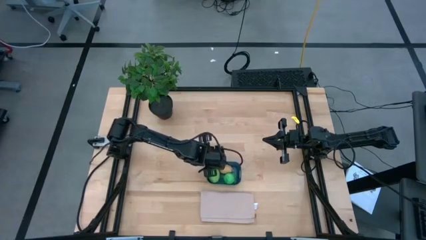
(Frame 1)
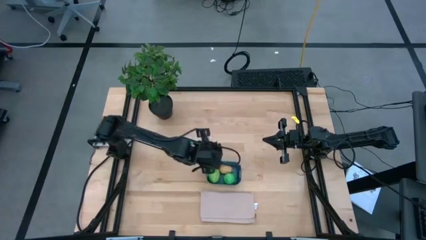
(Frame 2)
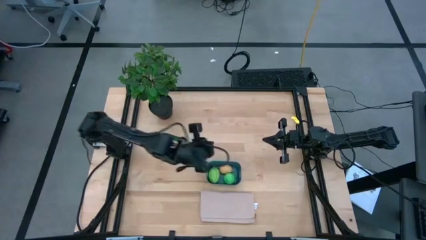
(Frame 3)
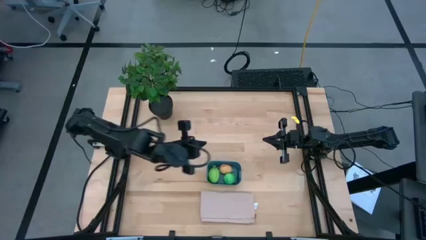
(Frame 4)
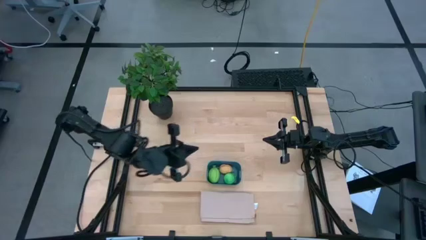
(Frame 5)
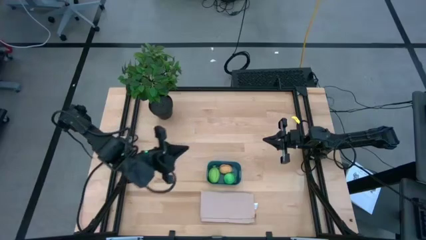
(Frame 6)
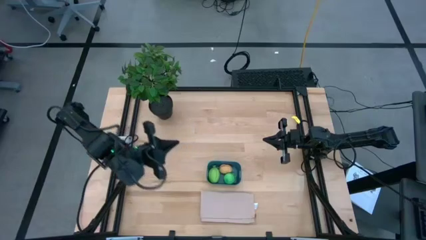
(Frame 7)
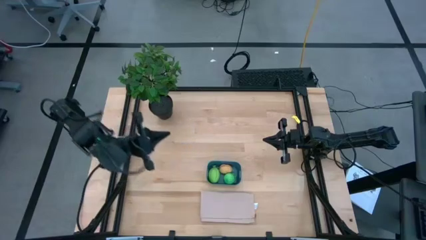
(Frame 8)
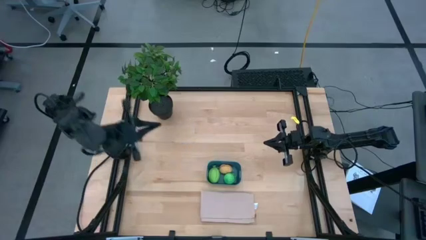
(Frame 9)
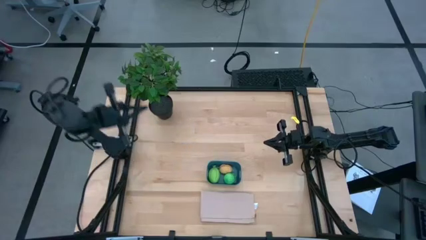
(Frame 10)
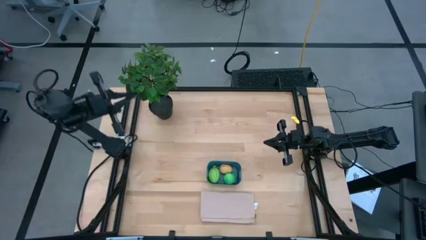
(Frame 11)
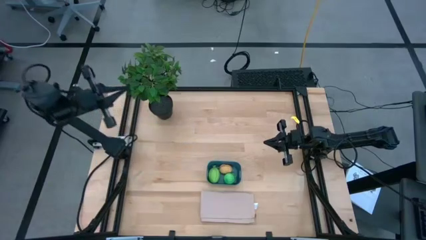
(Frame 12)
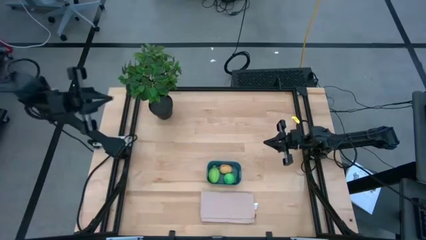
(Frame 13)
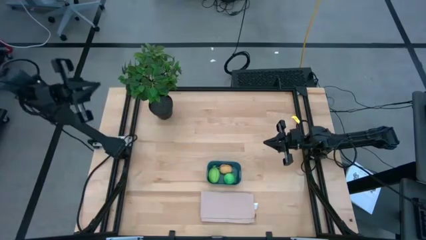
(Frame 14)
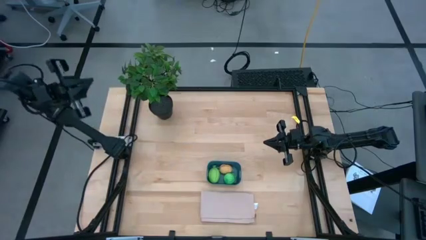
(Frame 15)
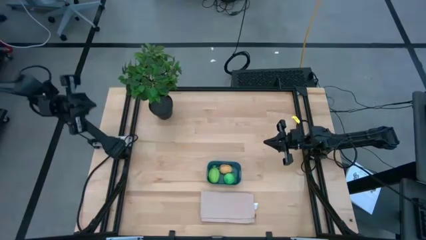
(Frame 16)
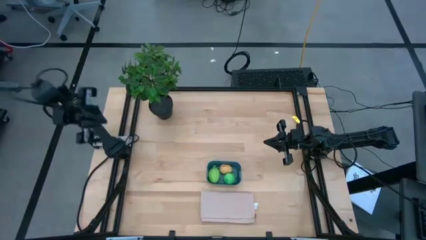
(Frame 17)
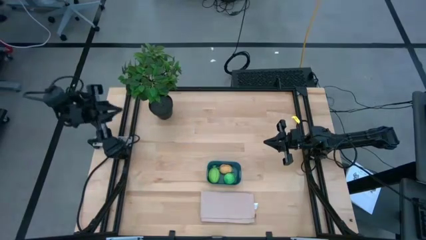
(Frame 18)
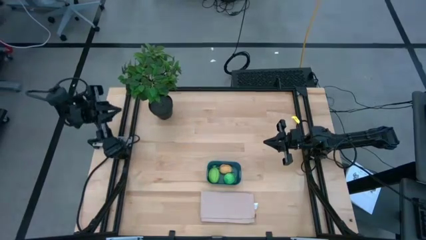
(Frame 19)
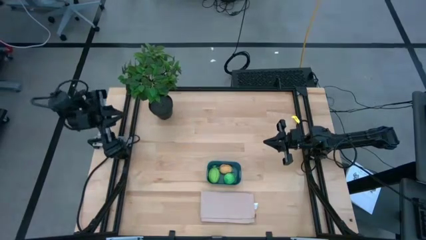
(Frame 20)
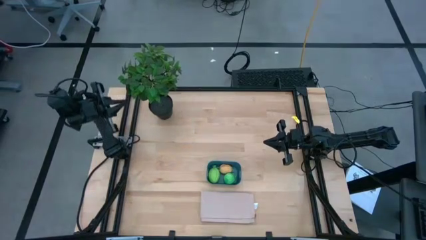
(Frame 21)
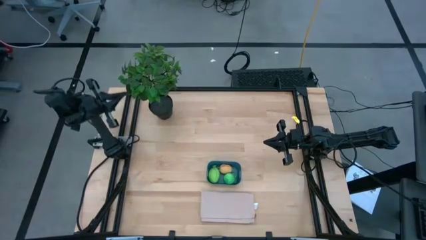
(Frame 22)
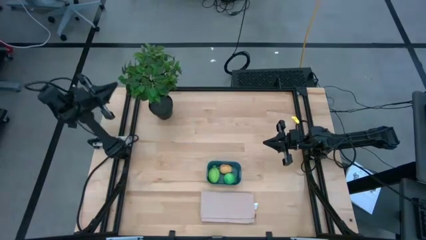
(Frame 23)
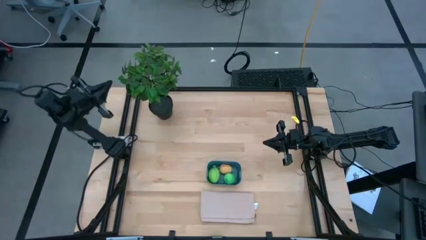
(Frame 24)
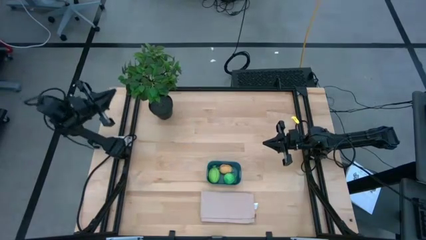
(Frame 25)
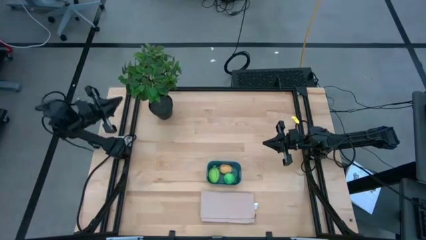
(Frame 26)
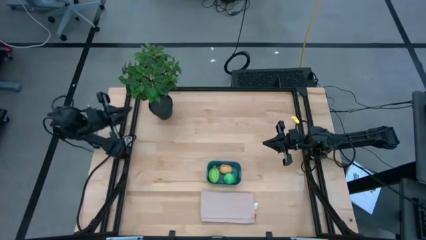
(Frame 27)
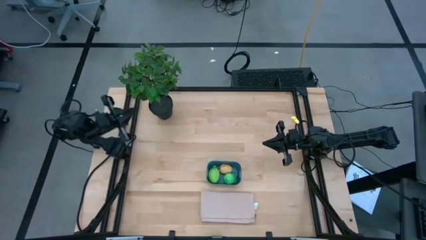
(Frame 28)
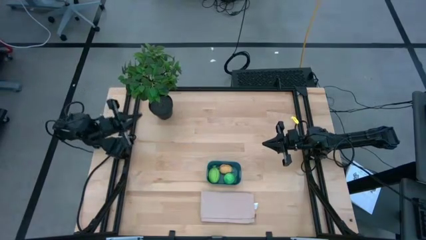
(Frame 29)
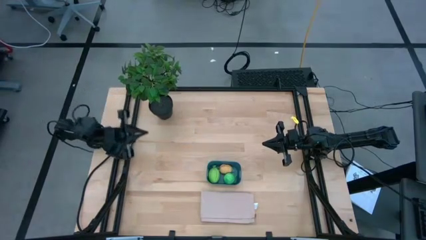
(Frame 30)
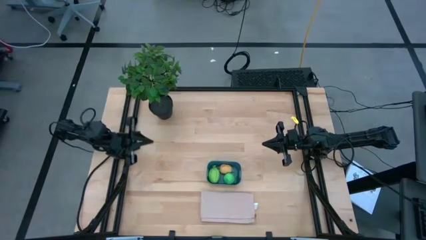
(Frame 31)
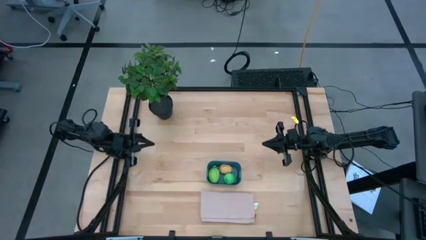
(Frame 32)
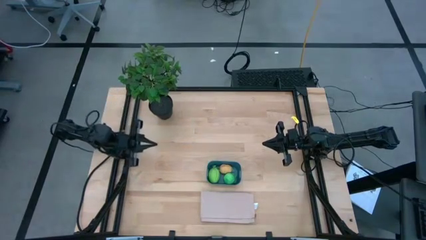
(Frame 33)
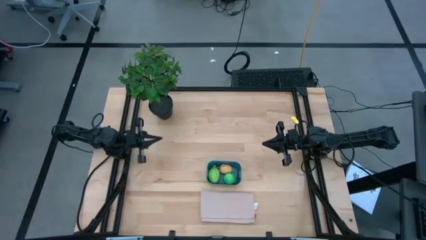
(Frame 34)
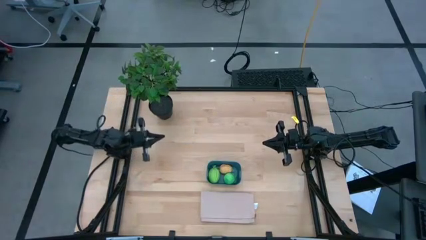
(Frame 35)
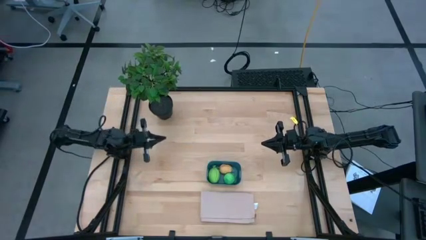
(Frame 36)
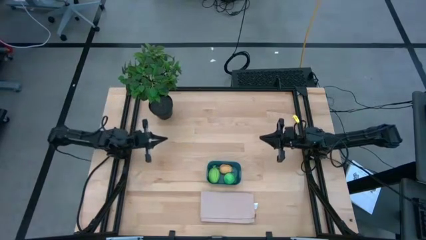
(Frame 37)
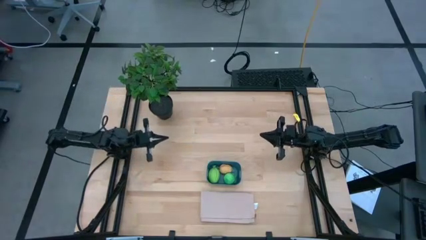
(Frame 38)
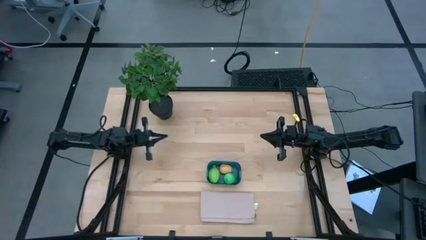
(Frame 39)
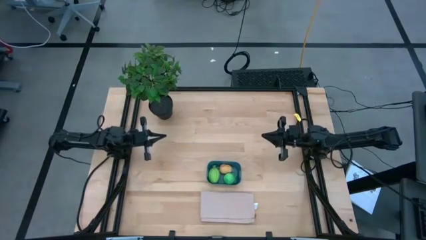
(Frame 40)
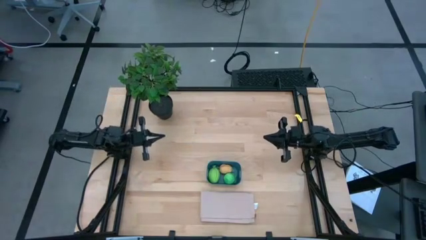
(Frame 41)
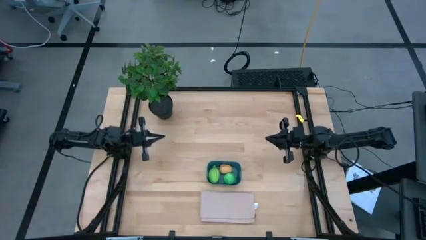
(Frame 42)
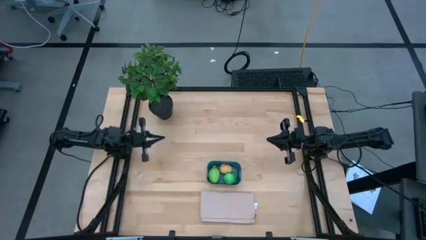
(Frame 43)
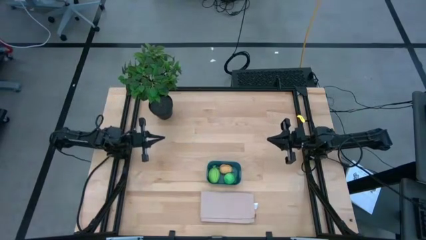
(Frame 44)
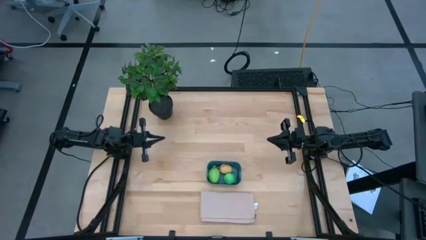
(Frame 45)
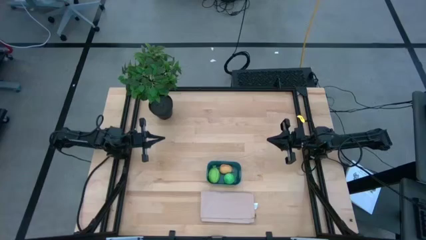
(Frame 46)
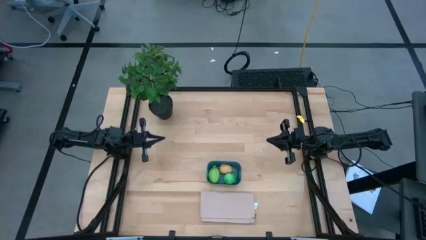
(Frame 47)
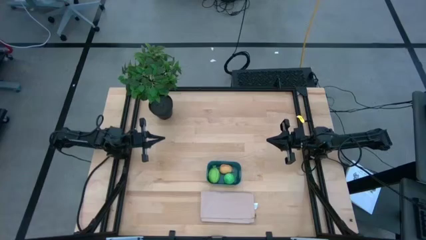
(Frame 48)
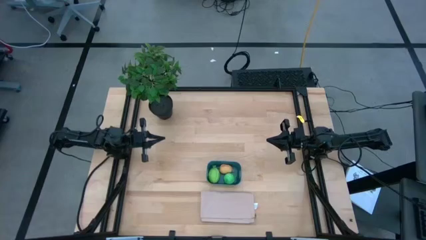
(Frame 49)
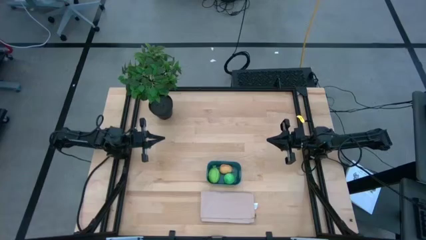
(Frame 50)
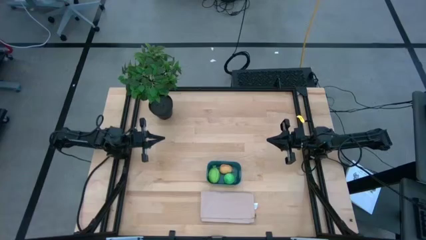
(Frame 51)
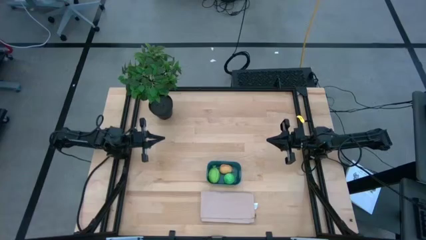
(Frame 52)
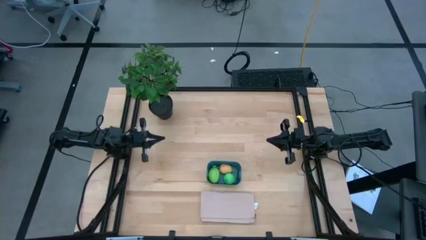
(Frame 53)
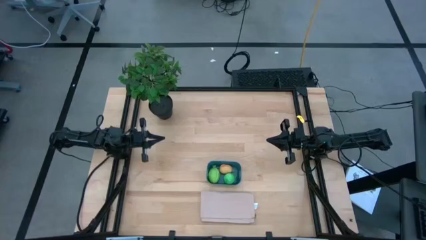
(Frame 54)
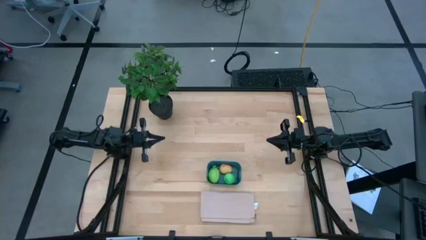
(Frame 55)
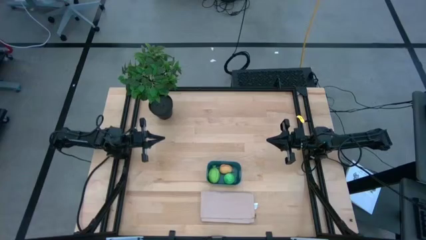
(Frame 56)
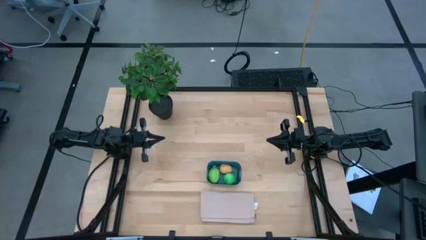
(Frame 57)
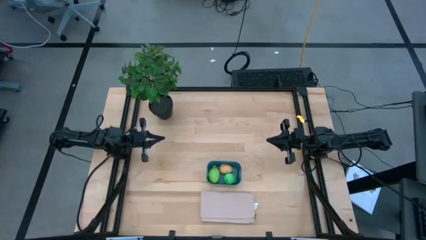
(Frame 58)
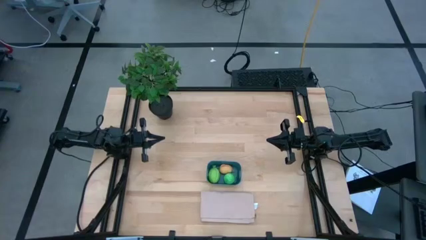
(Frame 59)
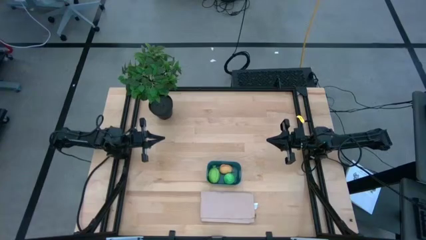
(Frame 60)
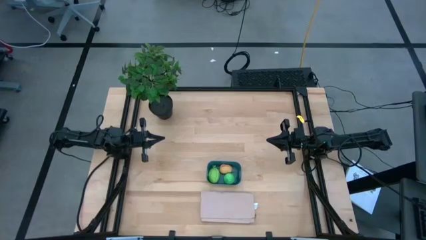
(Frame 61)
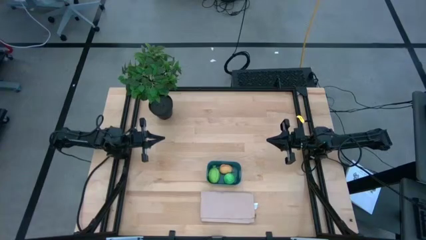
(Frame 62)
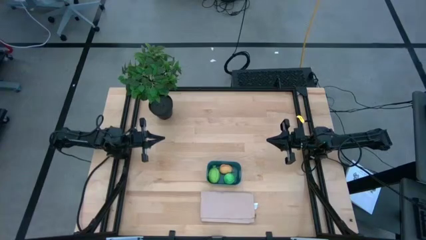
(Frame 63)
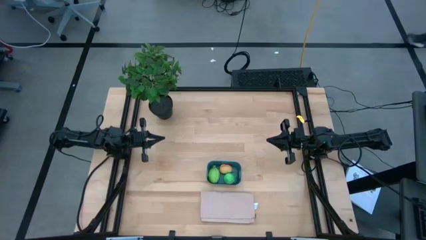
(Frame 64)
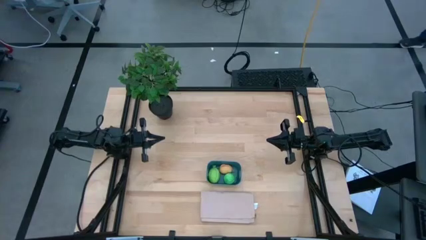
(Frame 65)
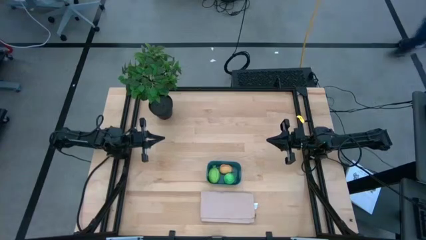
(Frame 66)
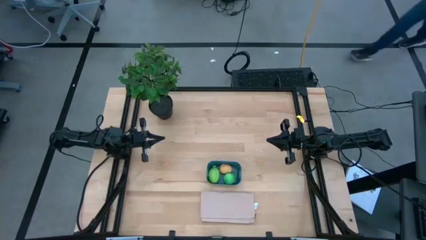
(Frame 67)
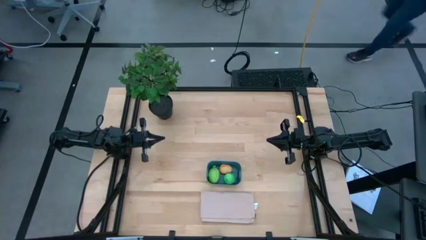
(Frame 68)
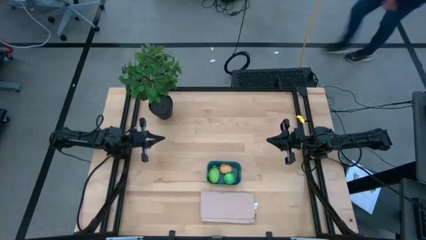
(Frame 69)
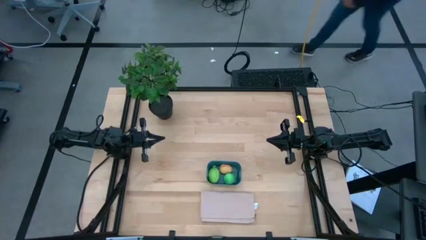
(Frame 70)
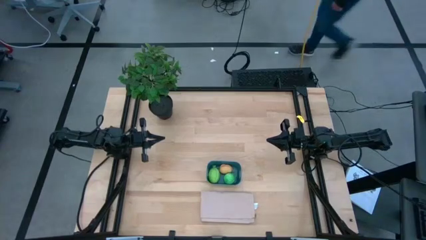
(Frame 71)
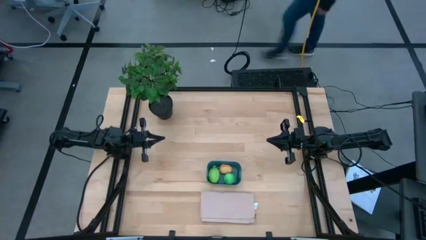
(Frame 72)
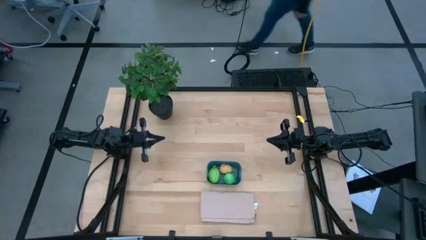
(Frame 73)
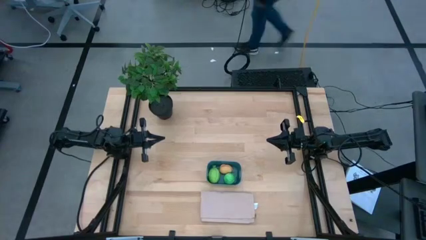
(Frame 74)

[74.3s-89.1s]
Task: Pick and placing Produce into tupperware
Return to Home Position

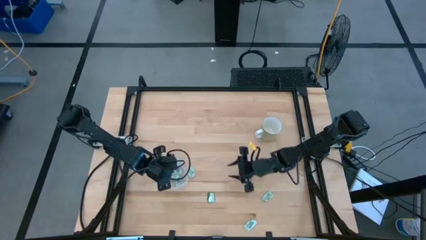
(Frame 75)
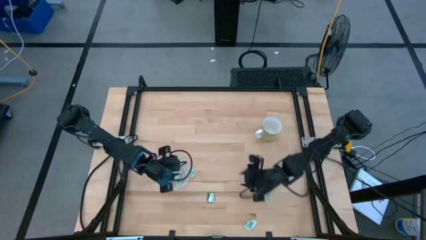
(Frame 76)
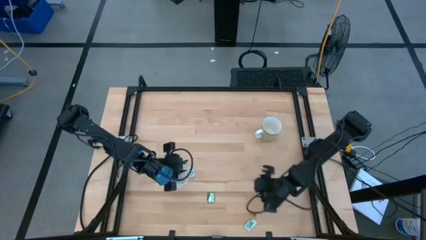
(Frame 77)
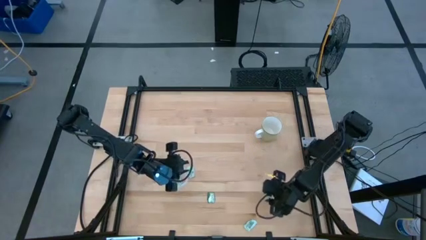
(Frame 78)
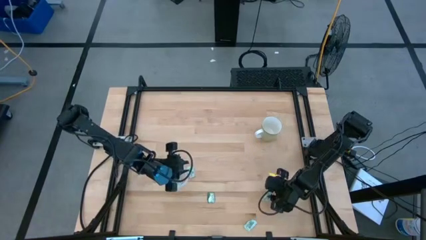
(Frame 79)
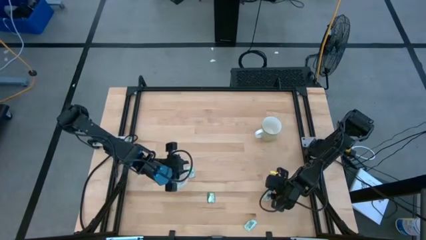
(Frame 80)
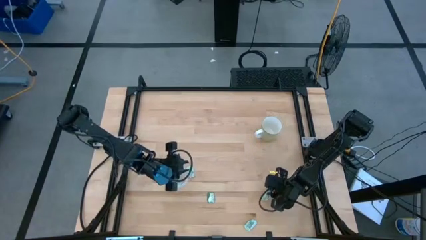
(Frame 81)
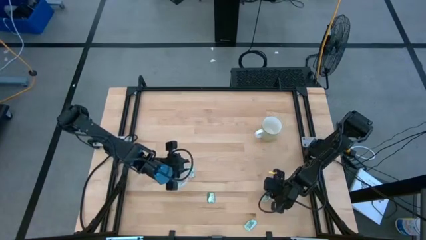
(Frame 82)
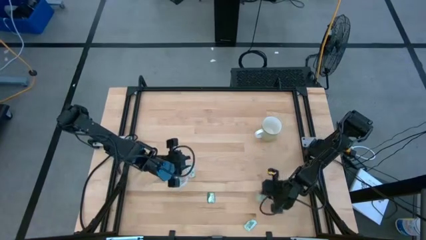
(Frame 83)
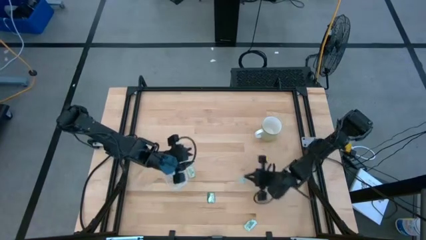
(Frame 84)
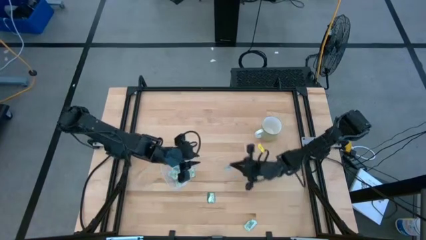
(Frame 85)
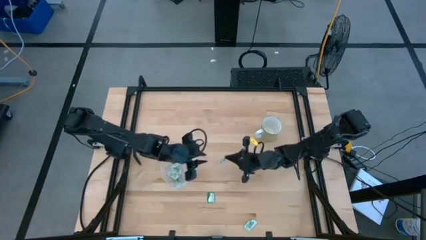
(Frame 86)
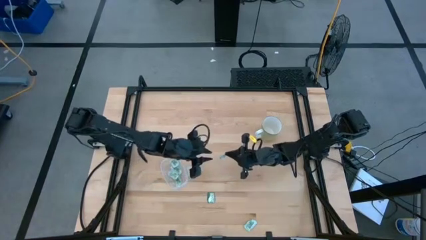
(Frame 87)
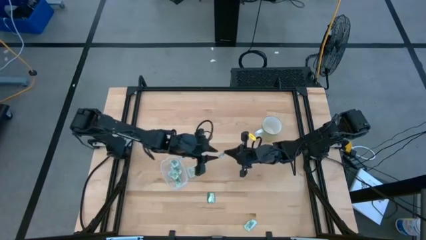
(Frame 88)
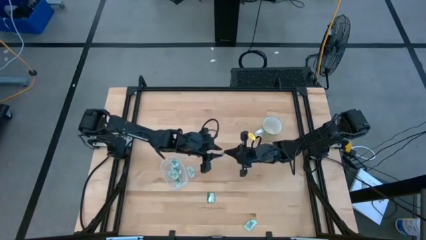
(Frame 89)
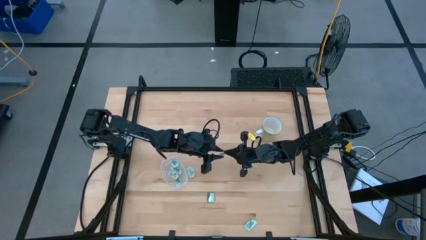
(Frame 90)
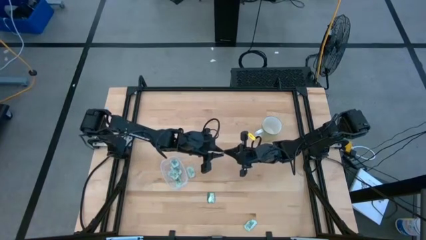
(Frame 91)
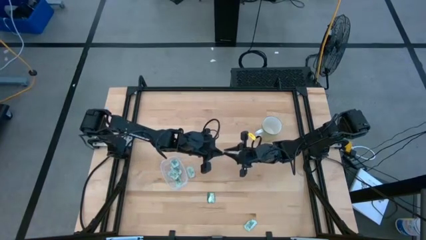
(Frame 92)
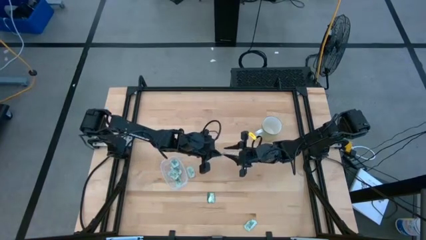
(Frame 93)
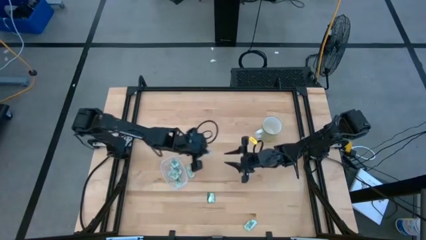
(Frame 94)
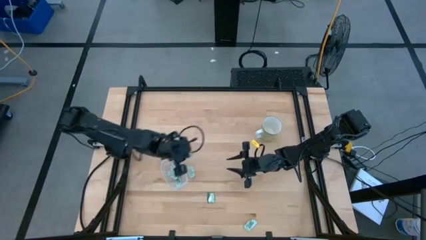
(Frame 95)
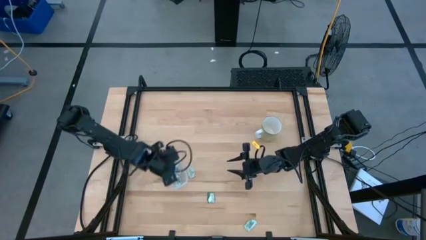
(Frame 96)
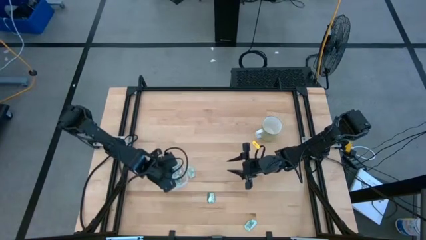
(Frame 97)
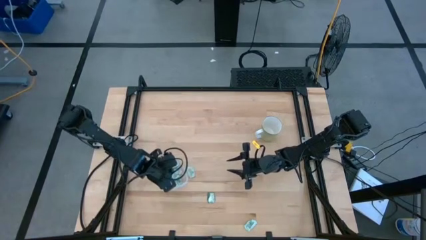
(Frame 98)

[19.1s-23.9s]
Task: Pick and place Stevia / Truvia into bins
Put the green stevia packet into the transparent bin
